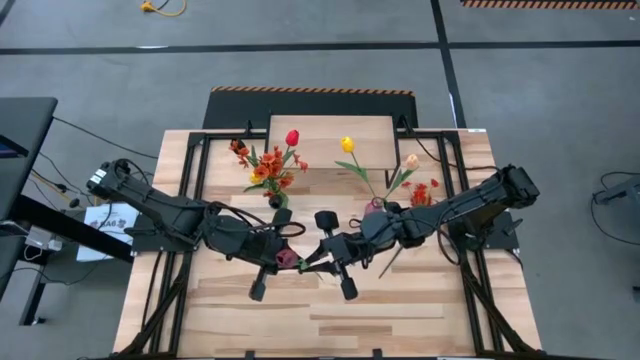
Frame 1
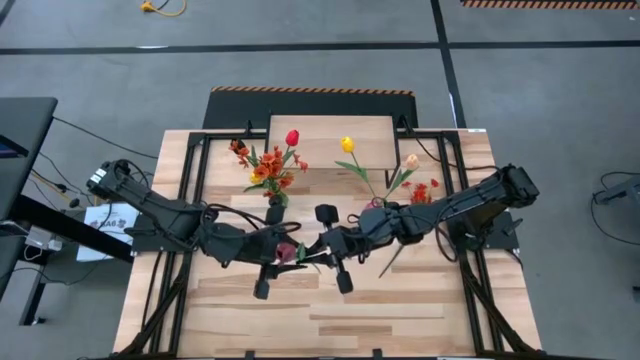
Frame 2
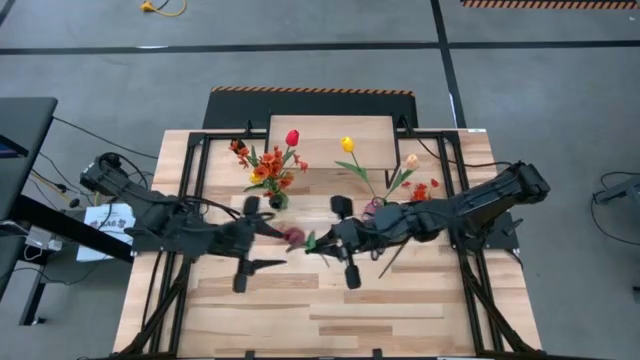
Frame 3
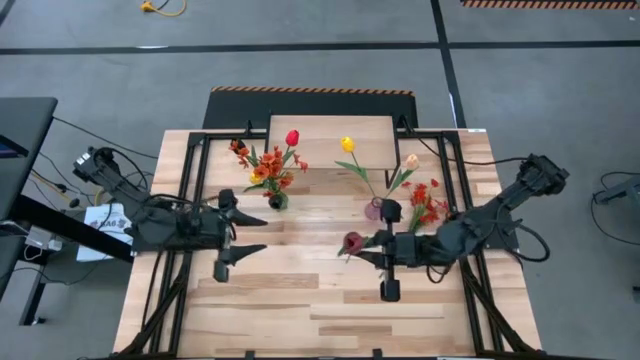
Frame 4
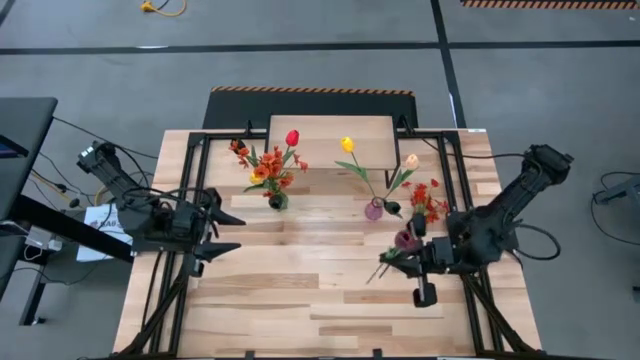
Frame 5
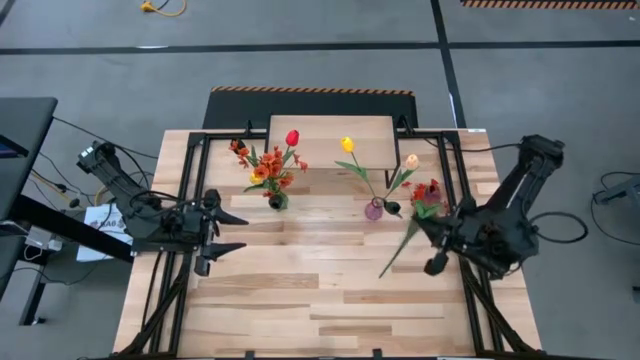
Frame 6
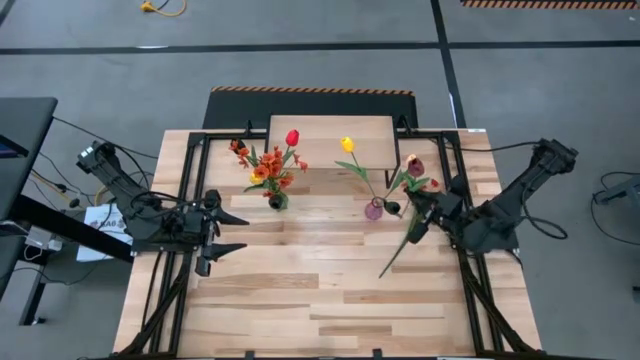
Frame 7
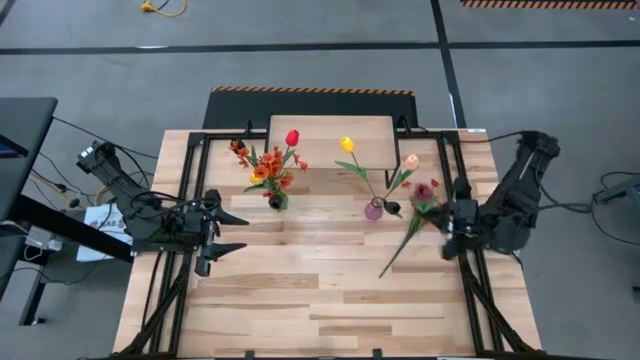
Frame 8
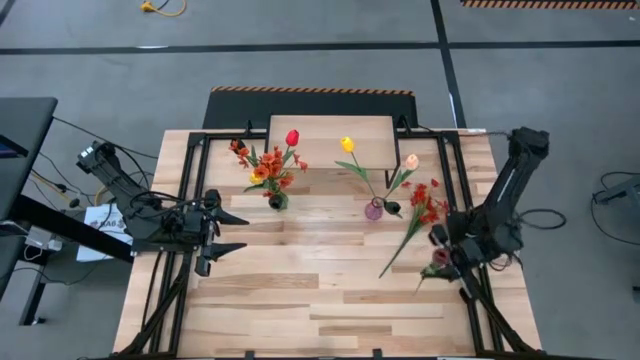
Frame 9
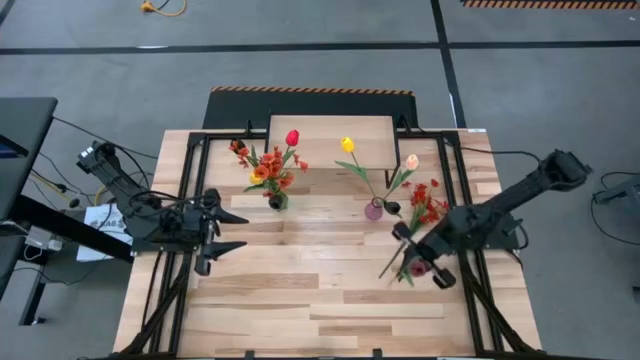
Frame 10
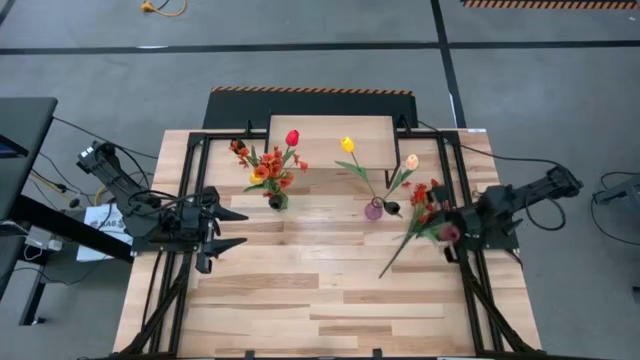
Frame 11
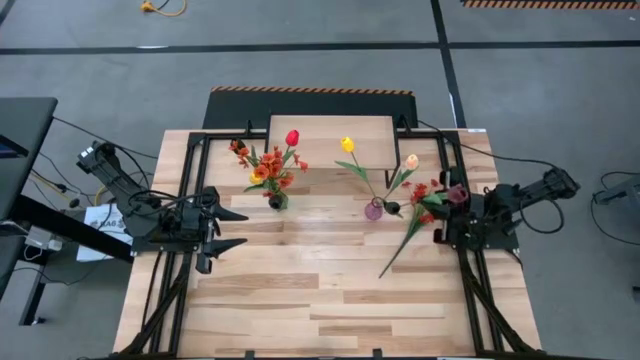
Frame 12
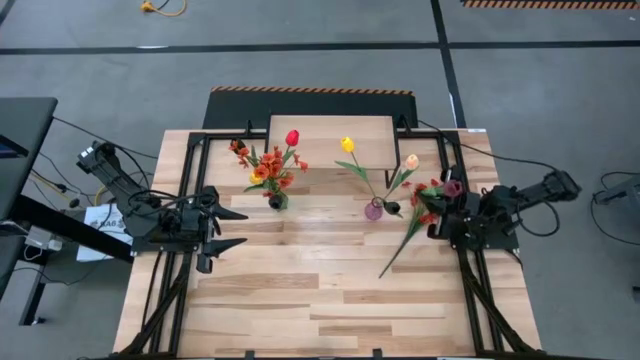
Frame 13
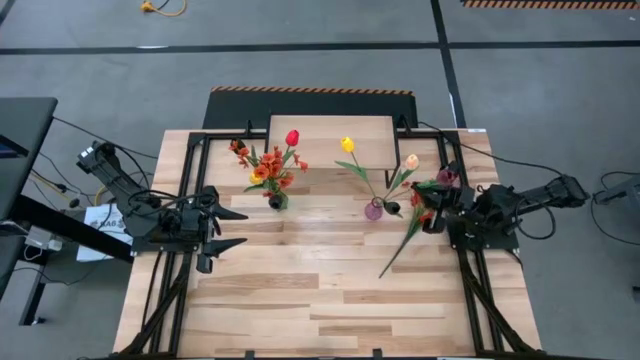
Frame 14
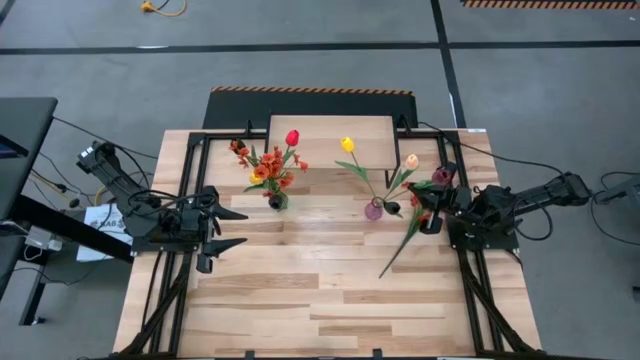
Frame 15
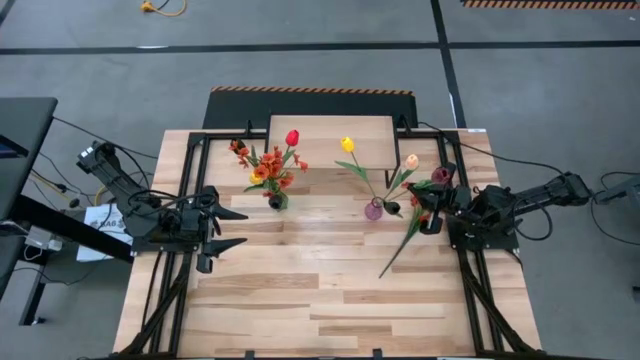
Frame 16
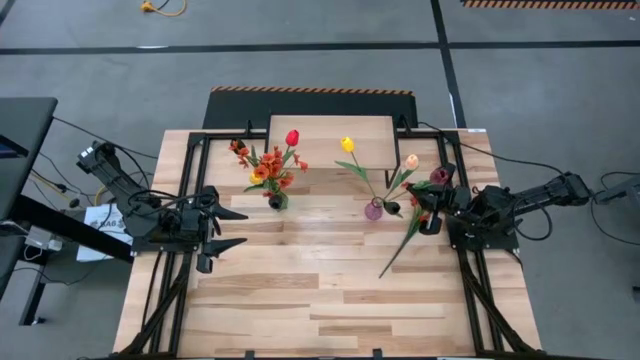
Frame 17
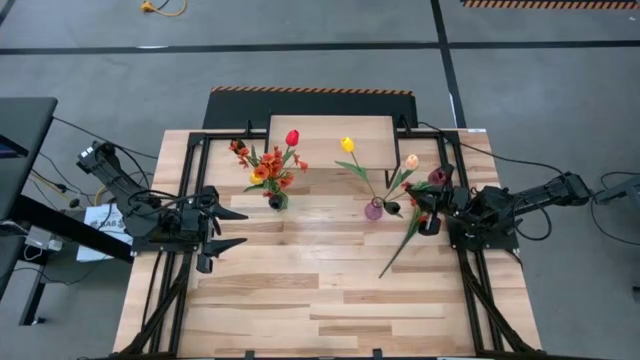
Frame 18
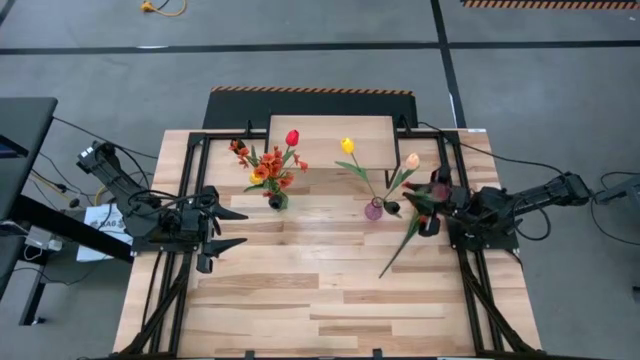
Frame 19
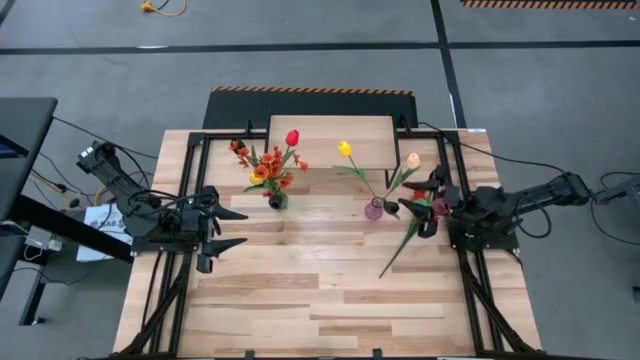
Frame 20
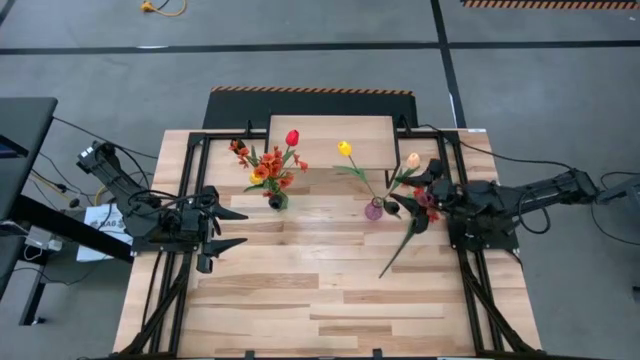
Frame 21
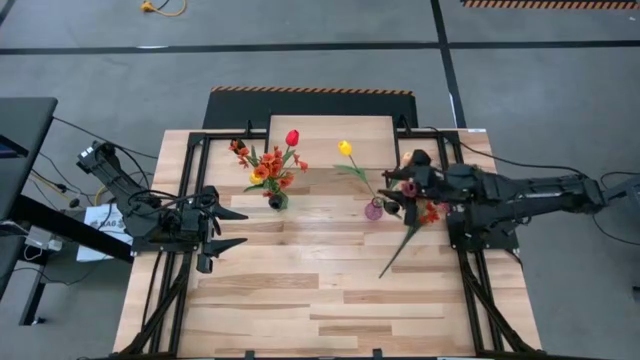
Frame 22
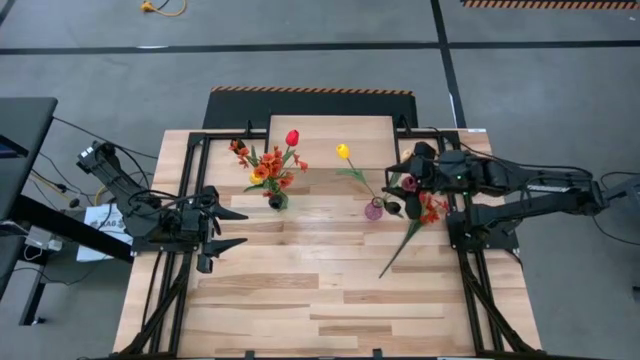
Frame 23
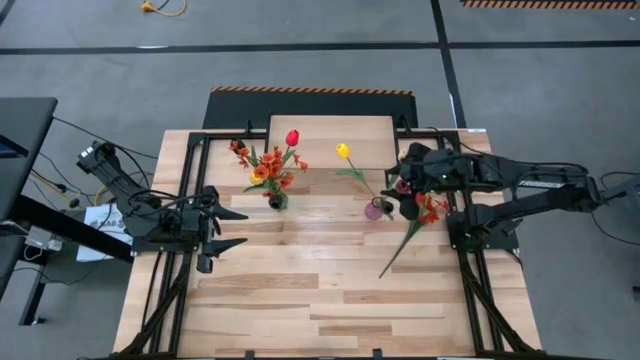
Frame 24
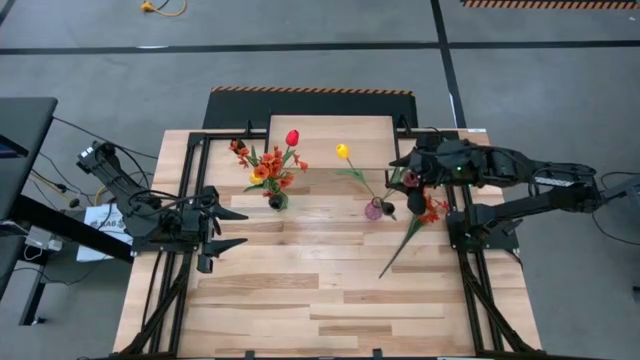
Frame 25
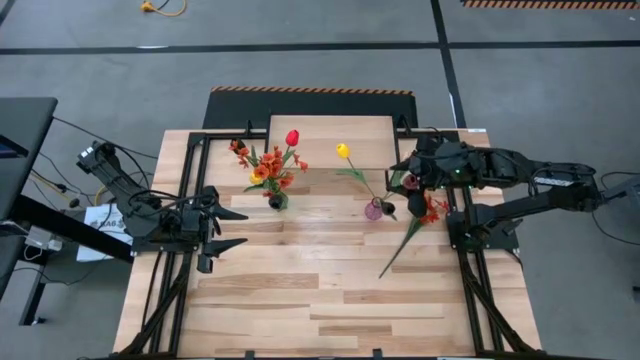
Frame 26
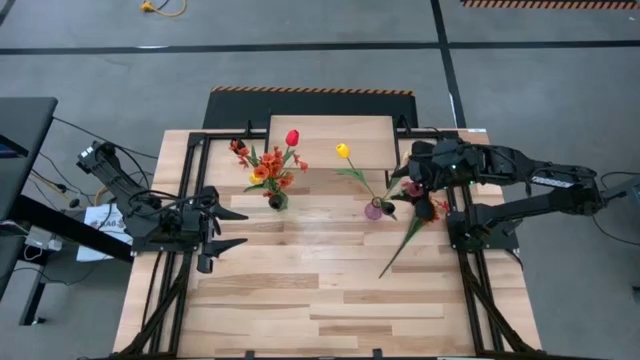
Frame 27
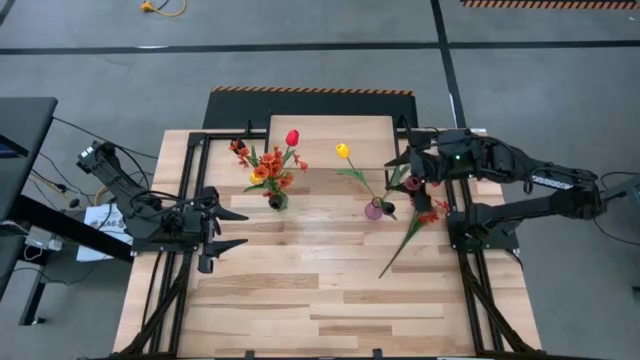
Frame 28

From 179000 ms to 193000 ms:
Task: Pick and place flowers into a vace then onto a shelf
Put the dark red tulip into the purple vase

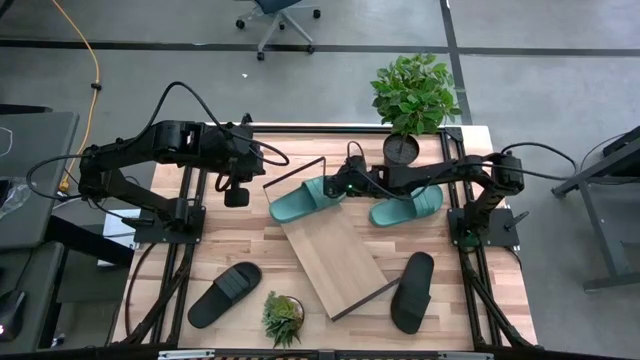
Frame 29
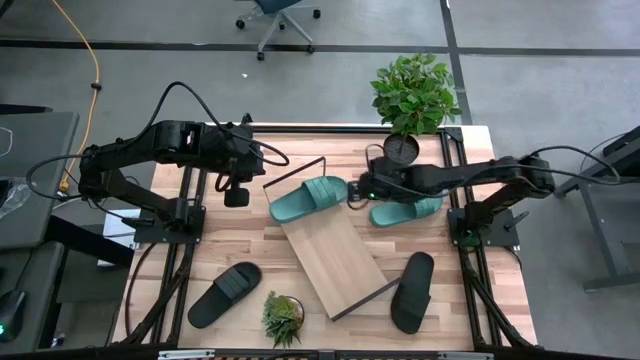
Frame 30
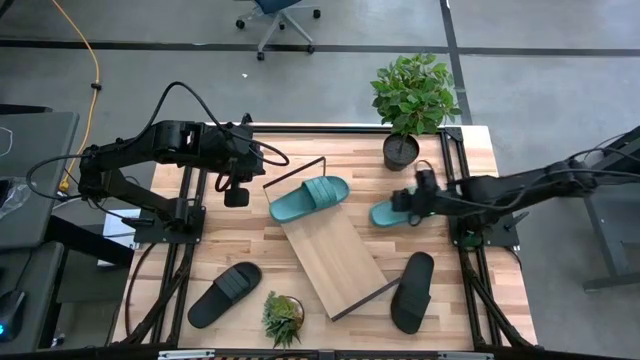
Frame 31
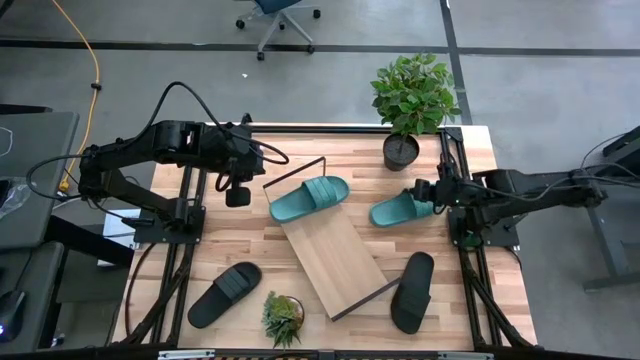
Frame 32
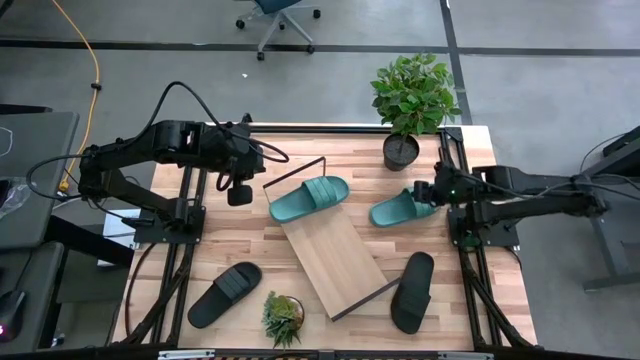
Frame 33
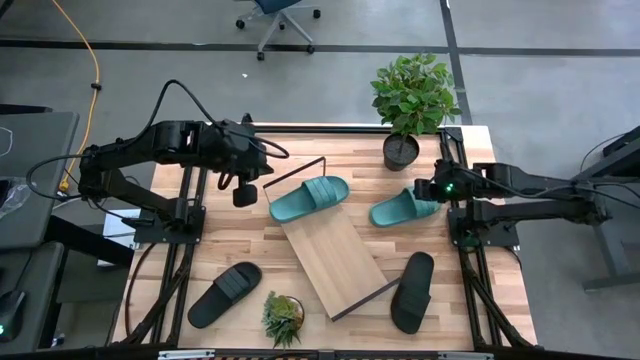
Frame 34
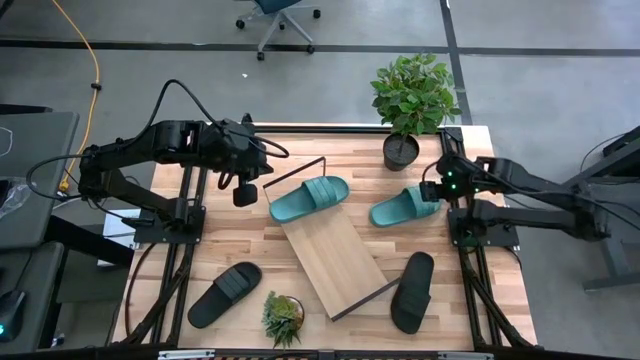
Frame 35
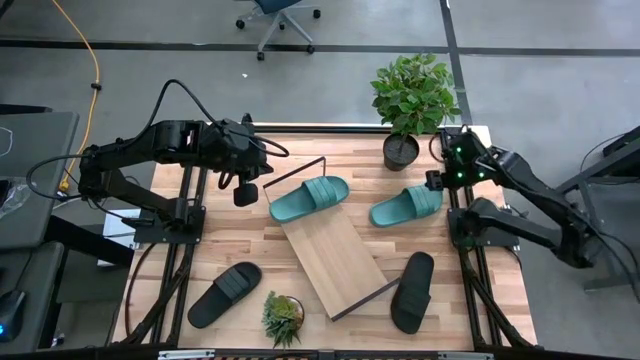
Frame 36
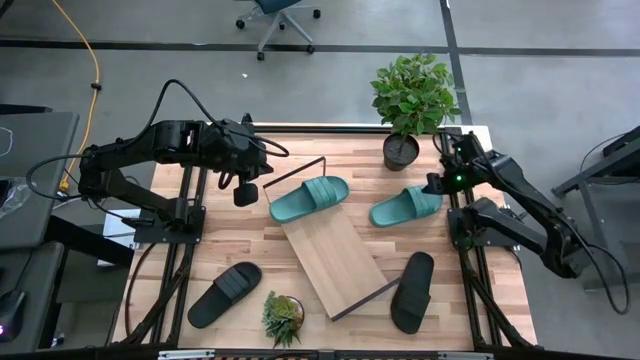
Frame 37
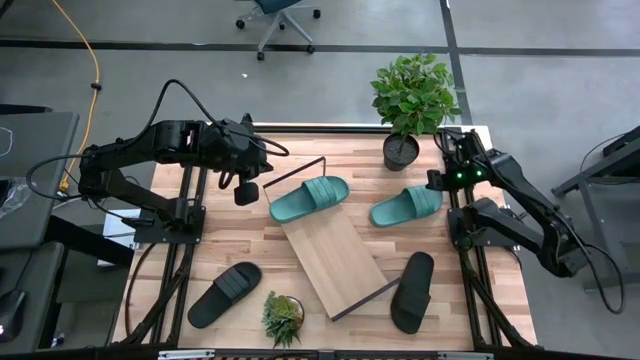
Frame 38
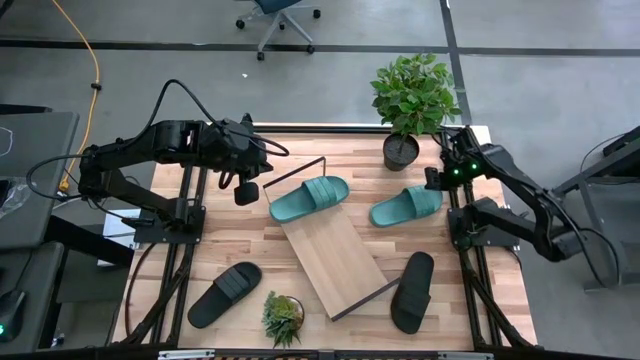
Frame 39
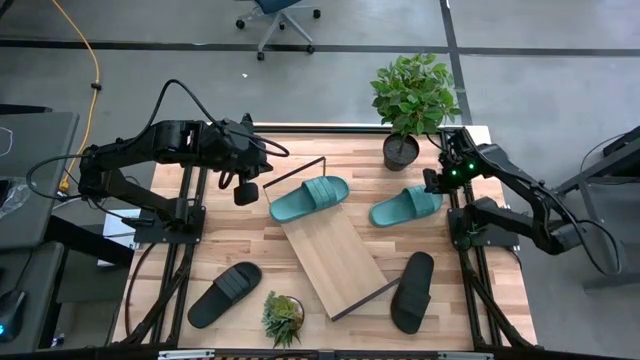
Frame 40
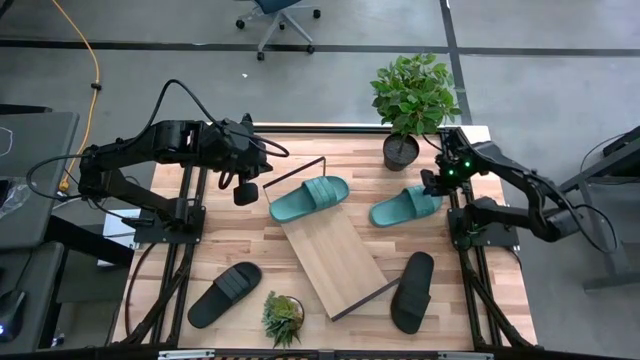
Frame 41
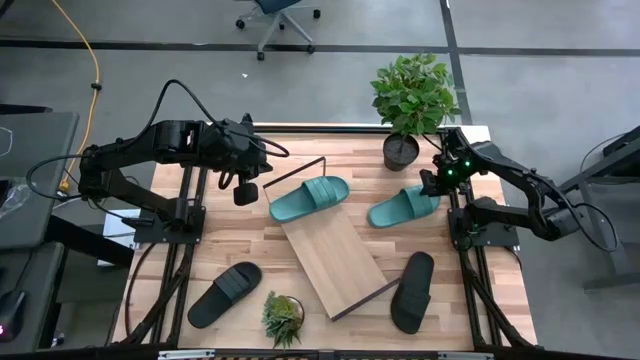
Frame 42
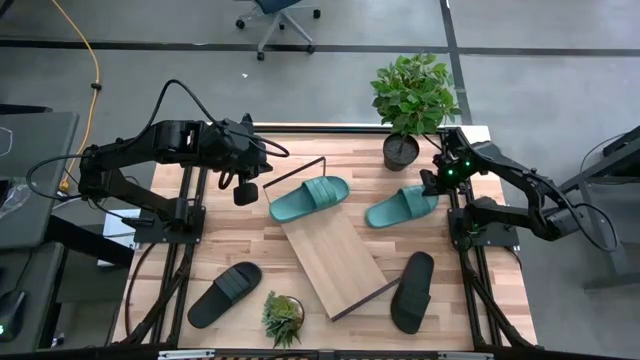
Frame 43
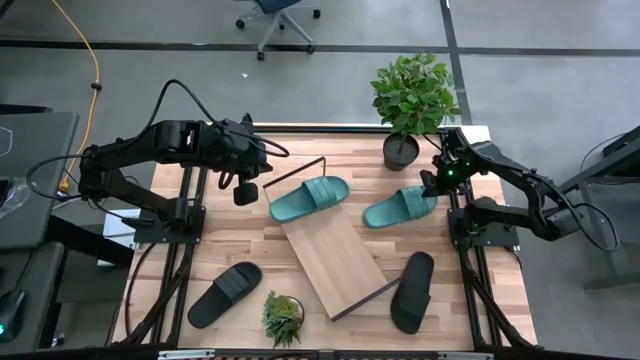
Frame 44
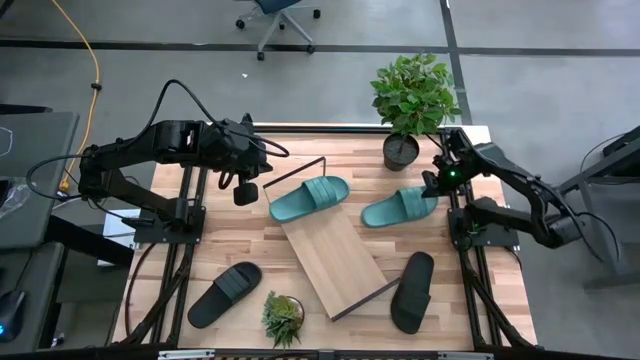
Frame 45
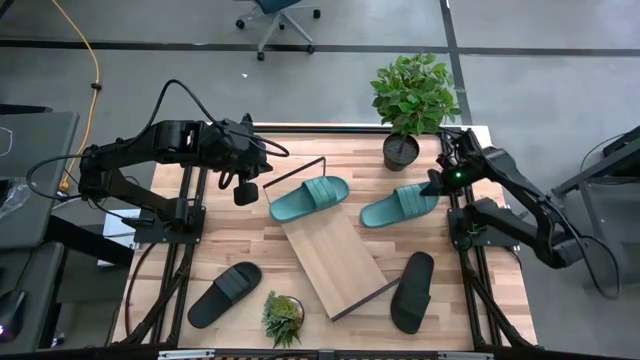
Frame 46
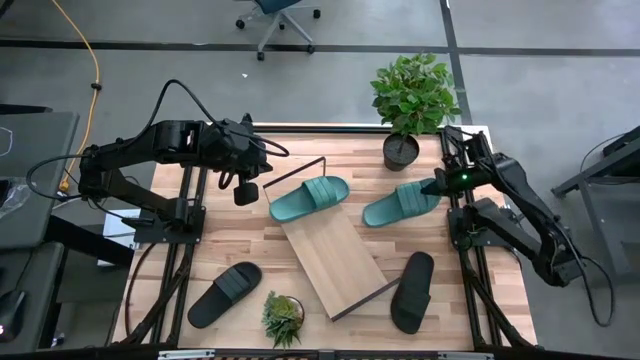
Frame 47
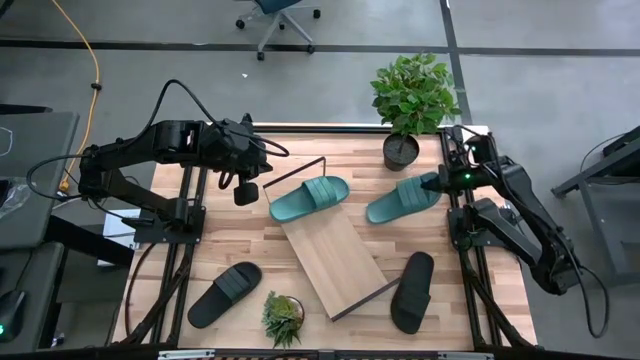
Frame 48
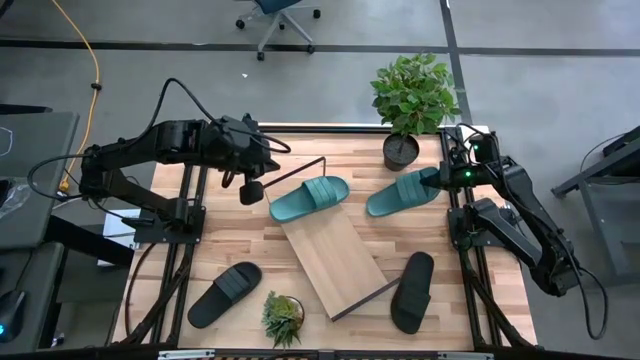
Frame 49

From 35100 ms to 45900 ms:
Task: Pick and place slides into the shelf
Put the green slide on the shelf
